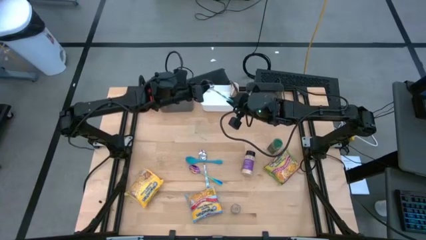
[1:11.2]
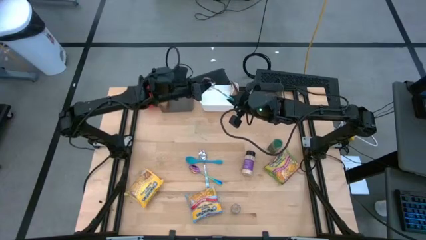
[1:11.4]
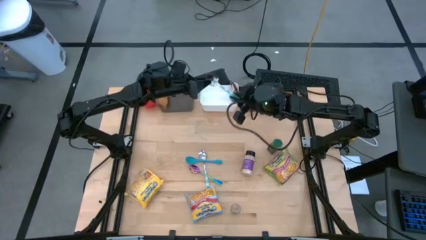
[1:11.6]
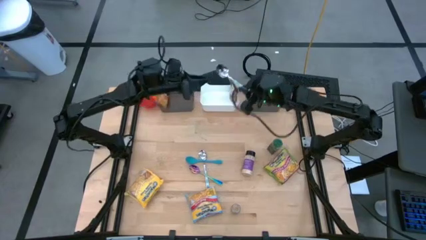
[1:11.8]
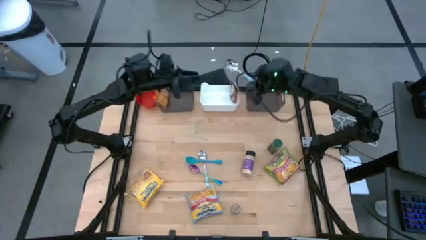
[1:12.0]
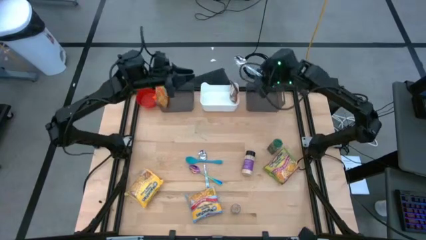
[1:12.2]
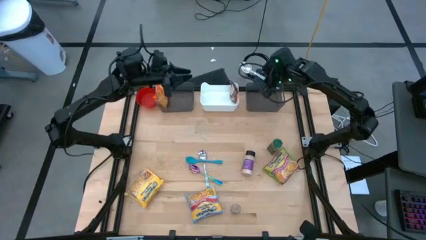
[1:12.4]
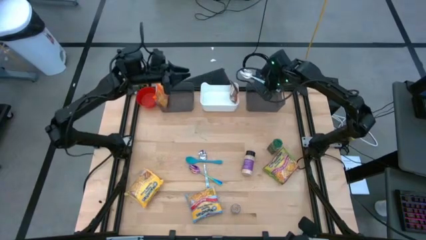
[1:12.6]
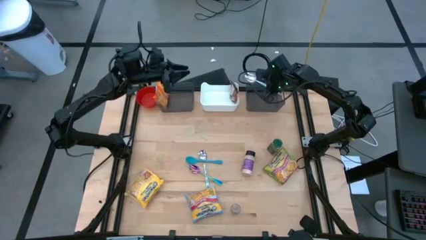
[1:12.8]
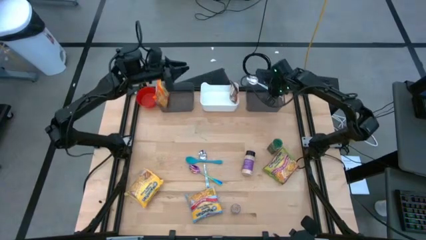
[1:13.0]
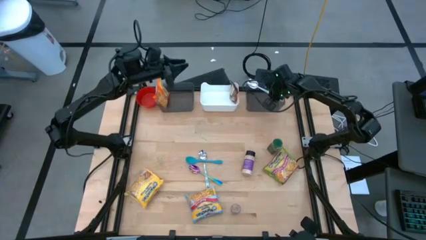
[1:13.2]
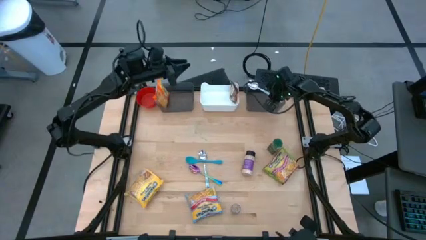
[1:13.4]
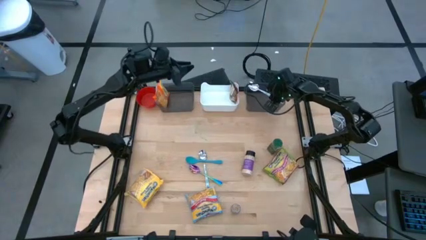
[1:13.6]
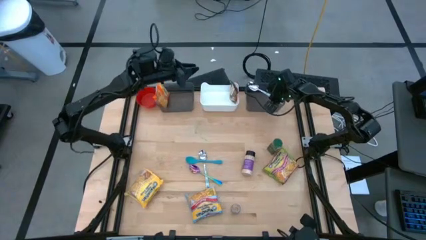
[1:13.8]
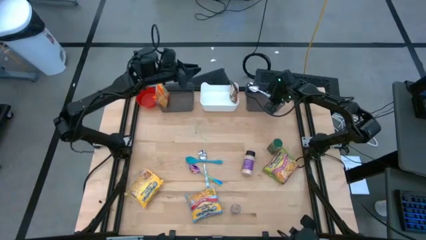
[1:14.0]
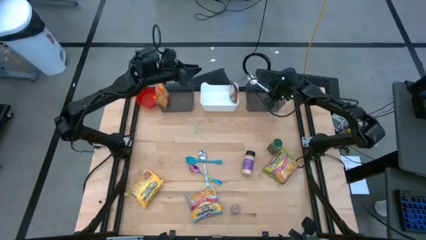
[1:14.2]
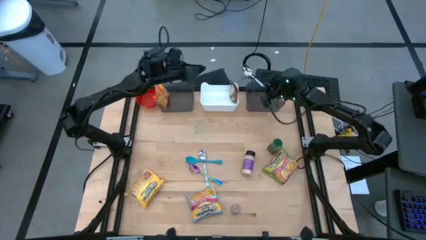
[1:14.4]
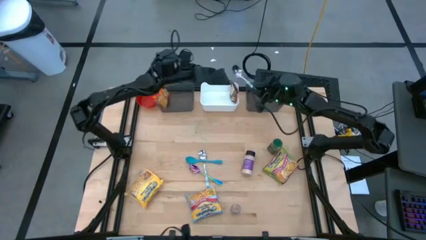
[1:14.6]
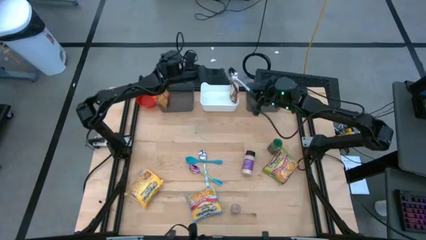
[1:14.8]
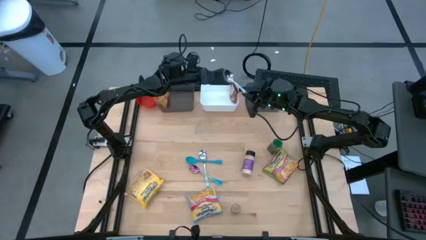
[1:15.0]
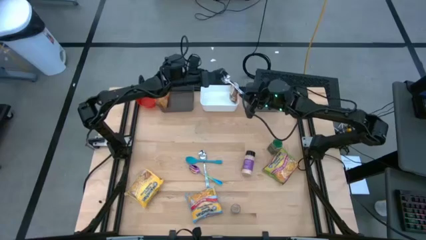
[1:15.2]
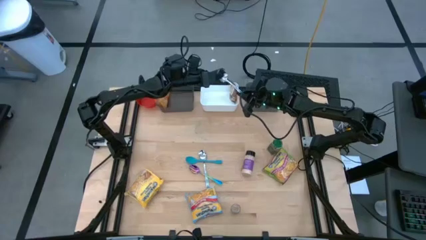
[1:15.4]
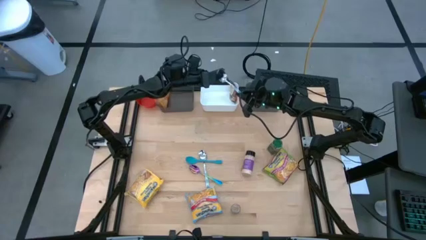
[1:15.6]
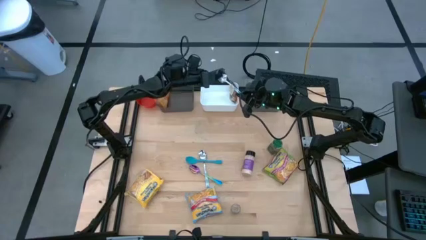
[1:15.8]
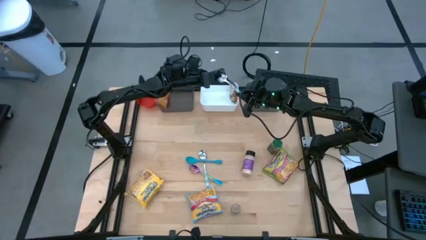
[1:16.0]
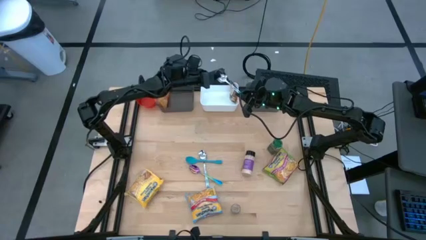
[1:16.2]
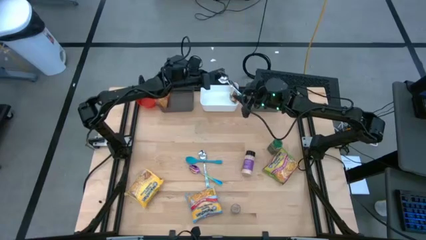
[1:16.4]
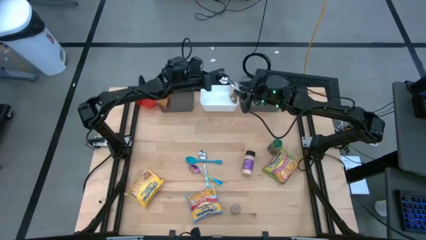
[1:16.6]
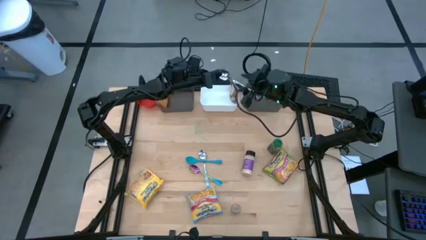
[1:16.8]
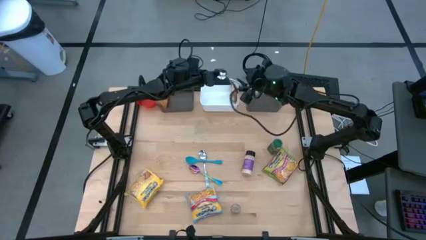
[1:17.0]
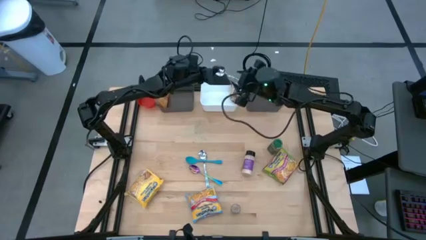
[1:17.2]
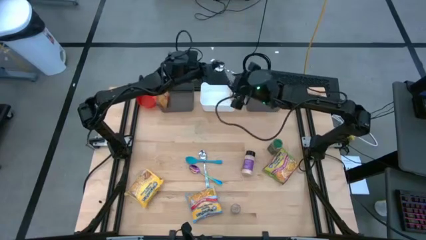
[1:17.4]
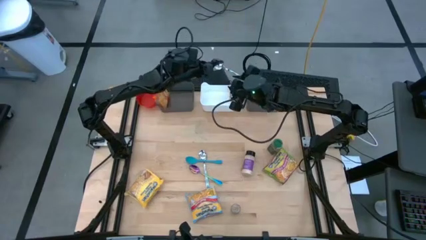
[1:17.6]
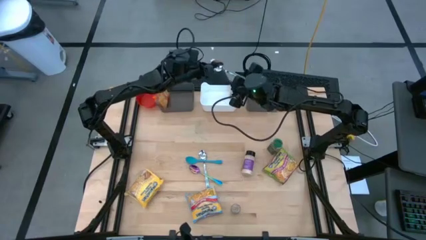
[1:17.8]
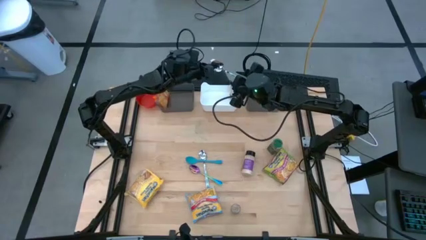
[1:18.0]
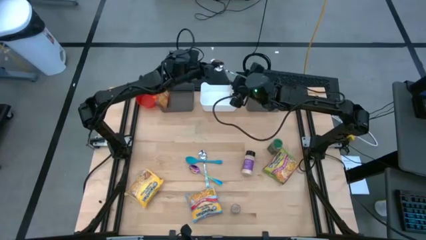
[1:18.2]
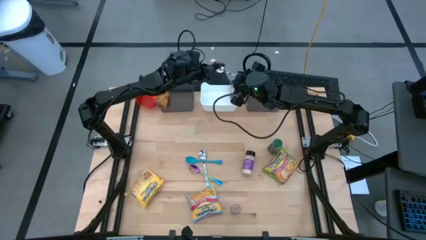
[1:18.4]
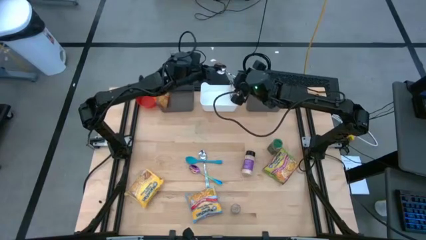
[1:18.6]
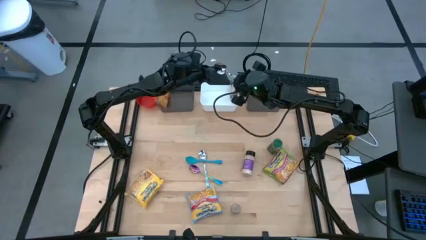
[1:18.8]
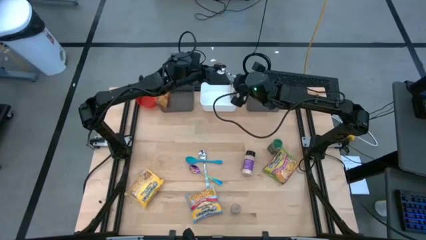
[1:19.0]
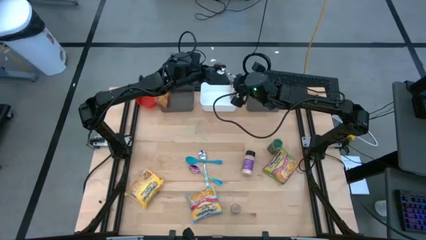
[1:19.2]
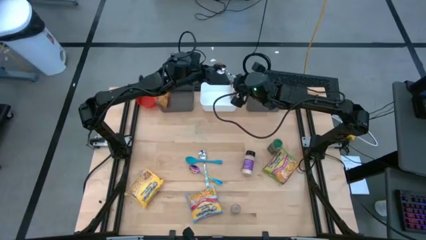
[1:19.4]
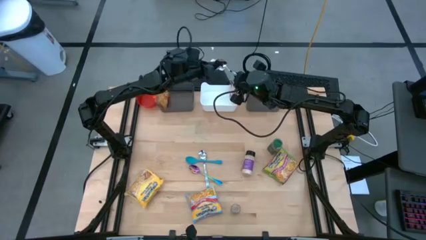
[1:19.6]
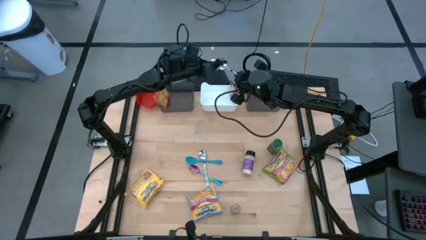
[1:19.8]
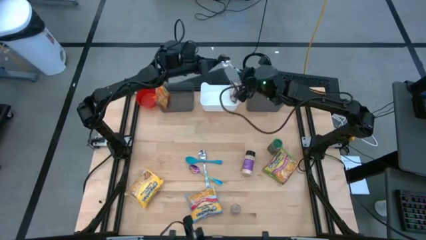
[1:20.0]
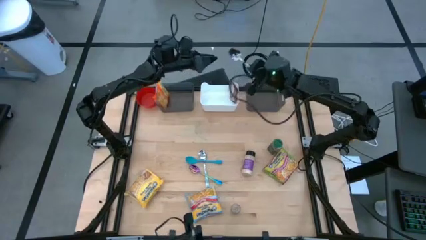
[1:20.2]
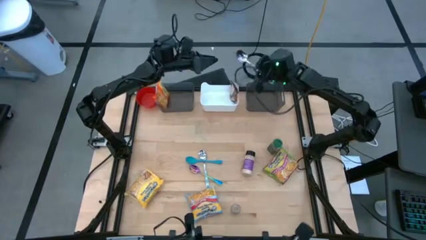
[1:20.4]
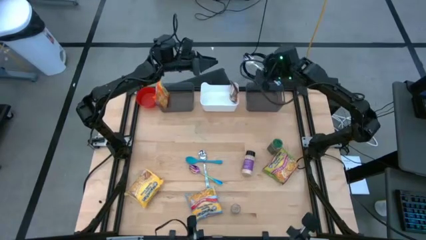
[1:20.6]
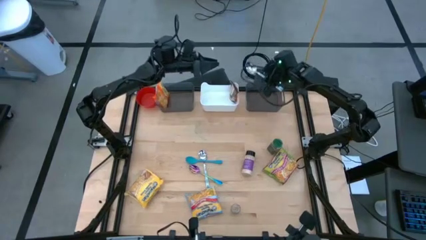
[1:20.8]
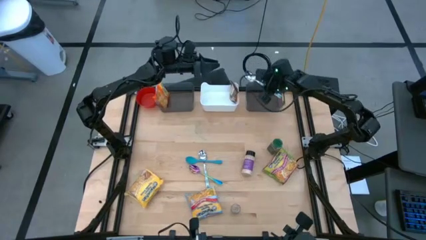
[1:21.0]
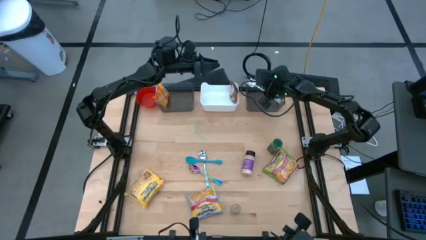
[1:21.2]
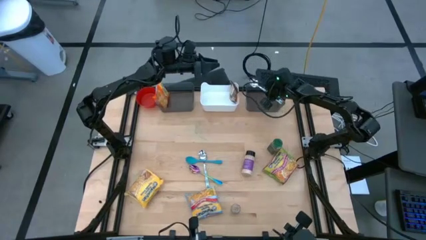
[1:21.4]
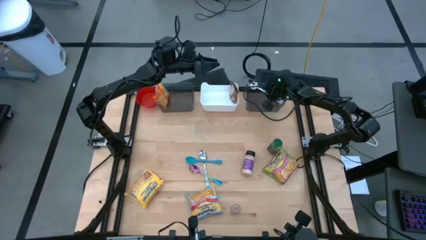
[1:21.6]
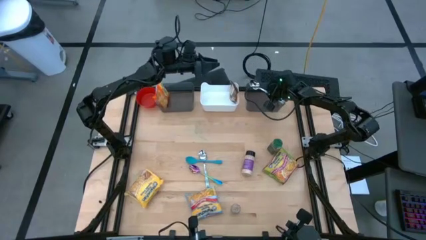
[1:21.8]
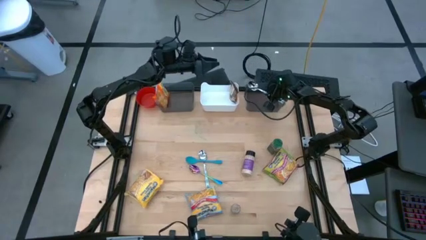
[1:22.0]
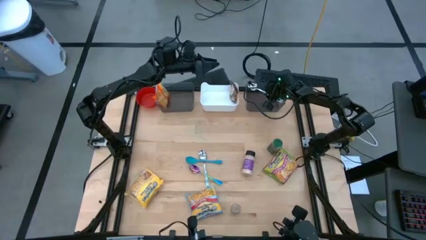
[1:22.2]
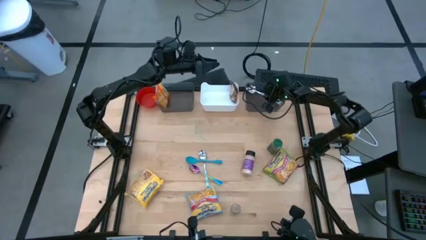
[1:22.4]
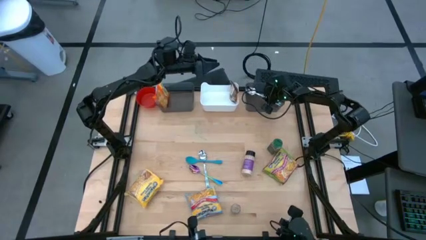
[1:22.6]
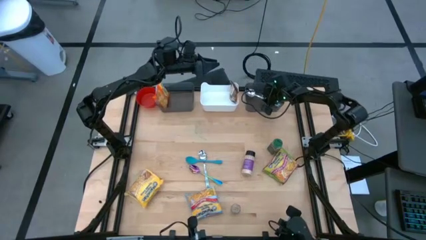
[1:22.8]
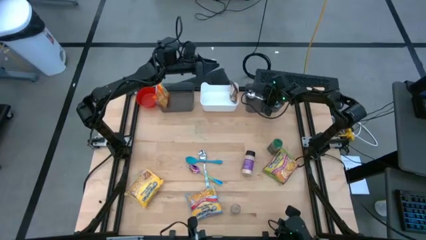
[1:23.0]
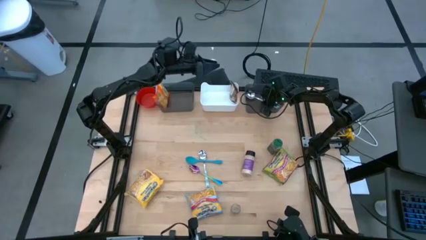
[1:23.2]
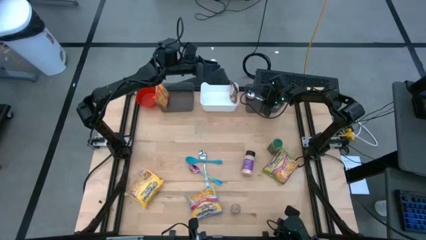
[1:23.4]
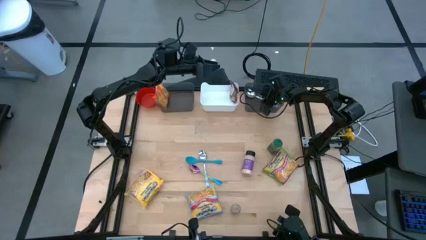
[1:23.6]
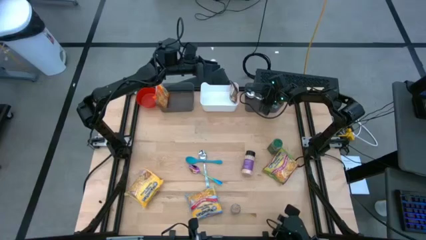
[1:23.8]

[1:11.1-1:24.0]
Task: Pick & Place Food Item
Put the top light blue spoon into the right black bin
